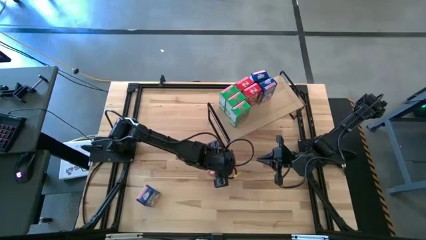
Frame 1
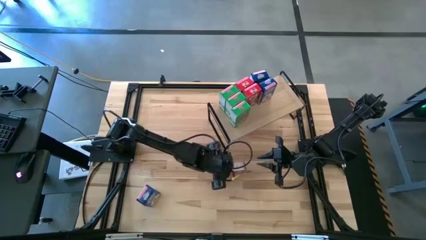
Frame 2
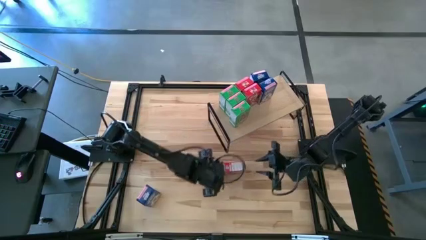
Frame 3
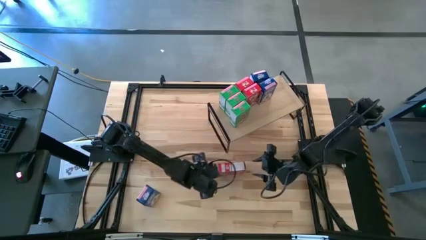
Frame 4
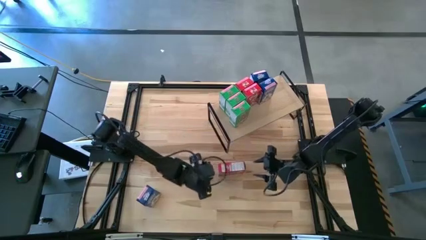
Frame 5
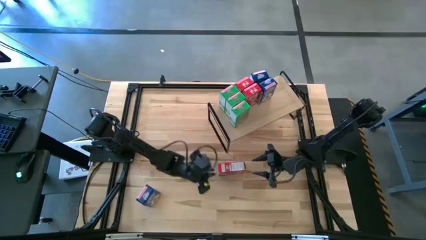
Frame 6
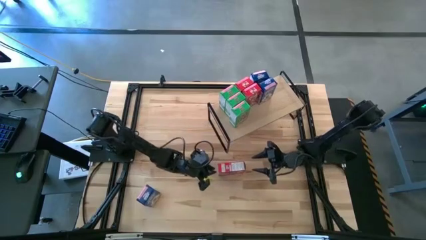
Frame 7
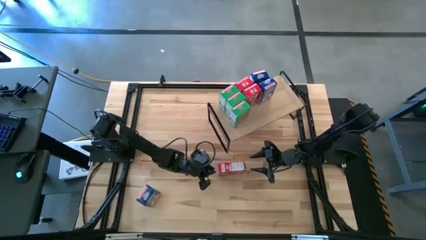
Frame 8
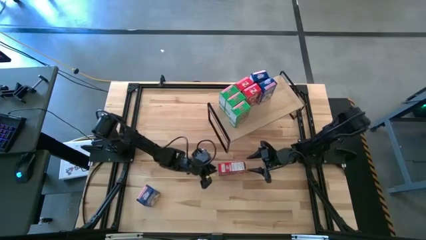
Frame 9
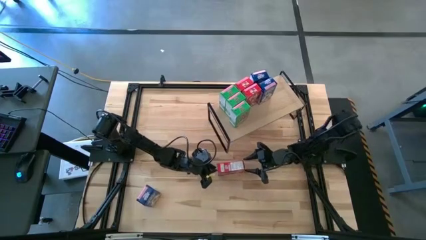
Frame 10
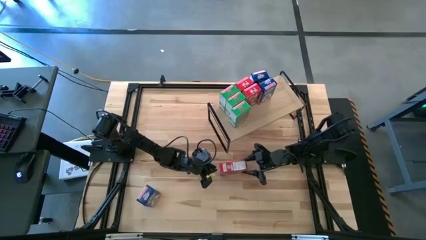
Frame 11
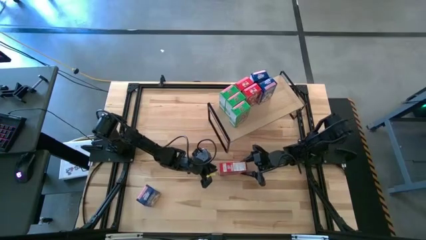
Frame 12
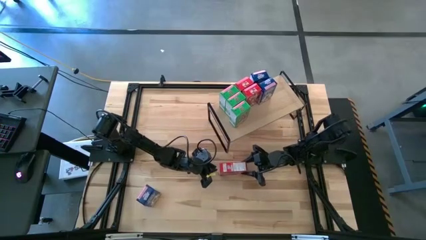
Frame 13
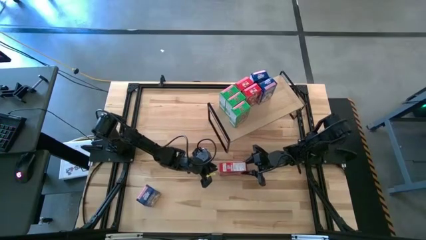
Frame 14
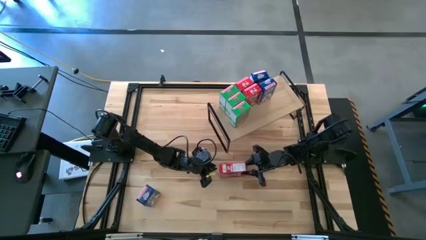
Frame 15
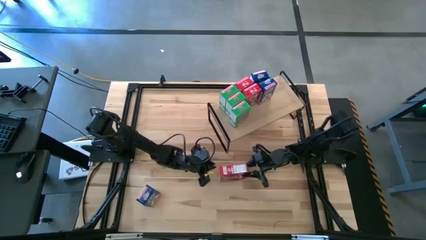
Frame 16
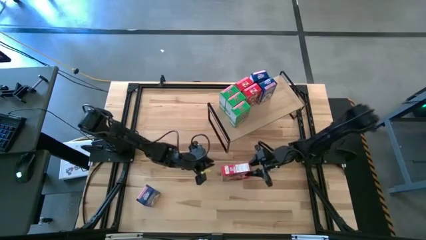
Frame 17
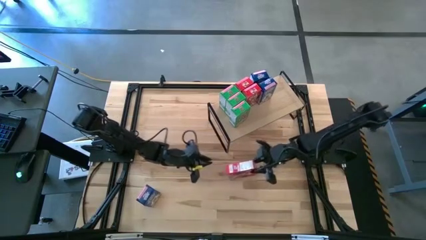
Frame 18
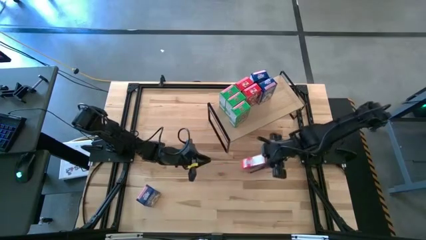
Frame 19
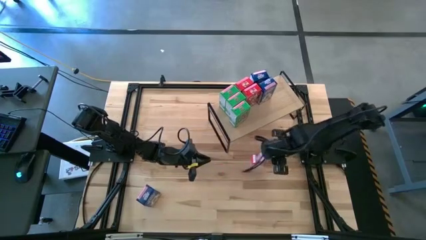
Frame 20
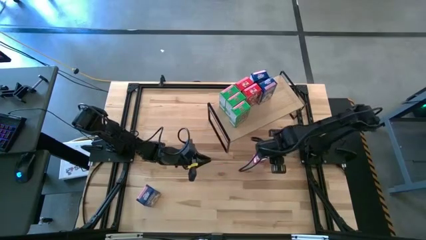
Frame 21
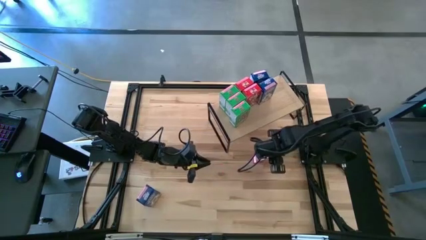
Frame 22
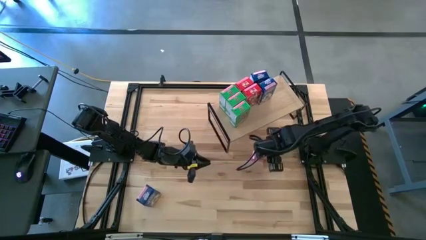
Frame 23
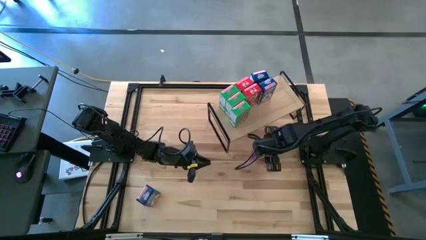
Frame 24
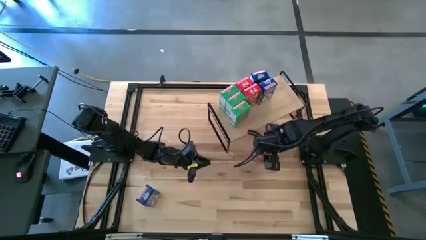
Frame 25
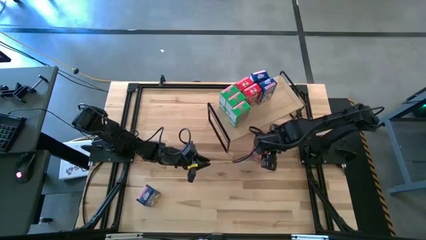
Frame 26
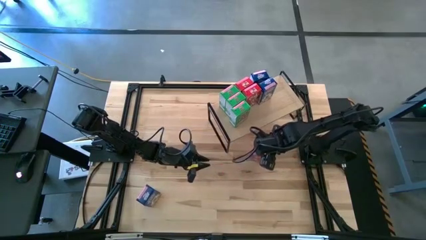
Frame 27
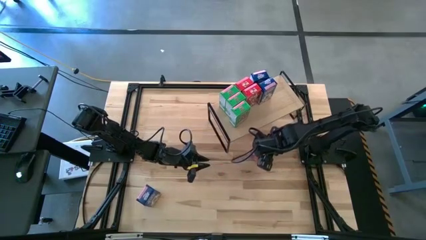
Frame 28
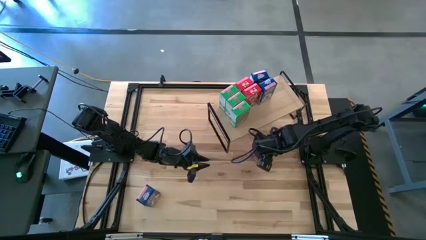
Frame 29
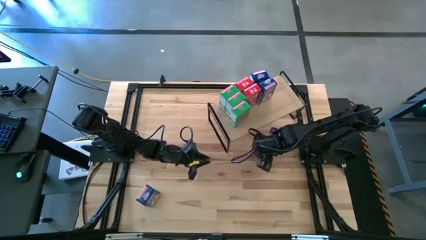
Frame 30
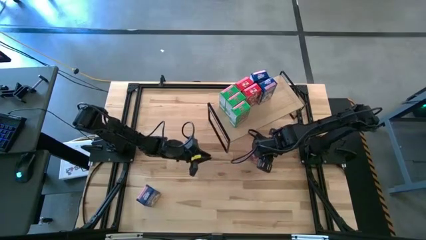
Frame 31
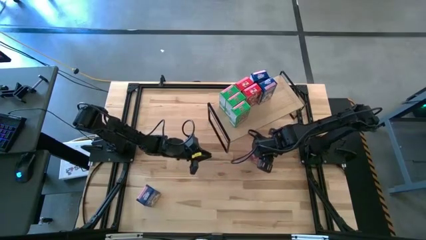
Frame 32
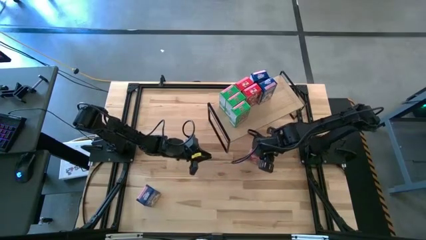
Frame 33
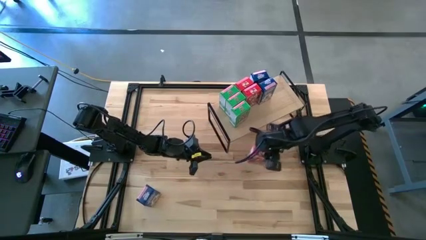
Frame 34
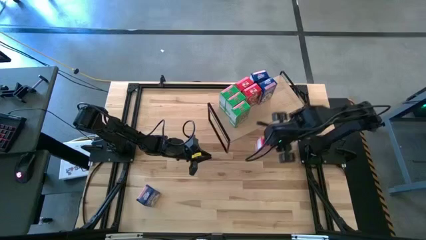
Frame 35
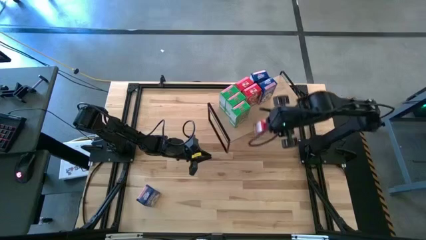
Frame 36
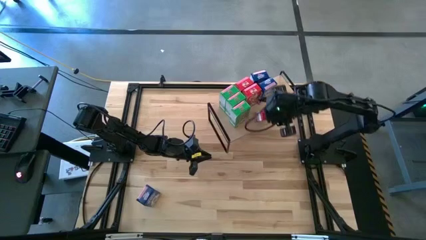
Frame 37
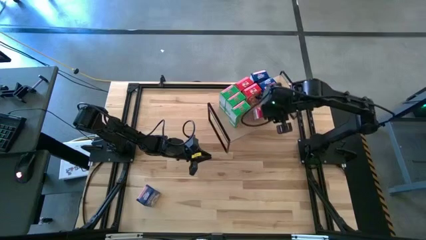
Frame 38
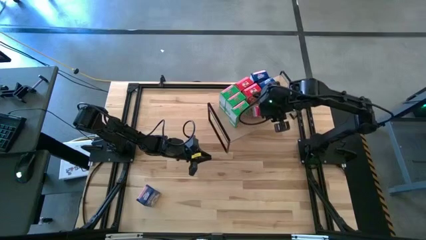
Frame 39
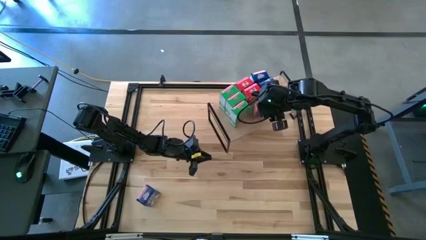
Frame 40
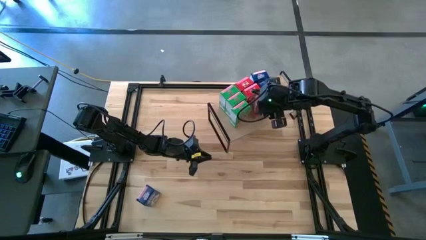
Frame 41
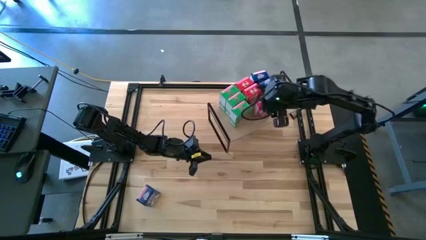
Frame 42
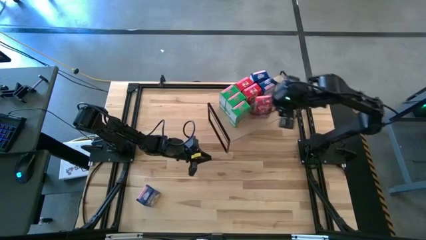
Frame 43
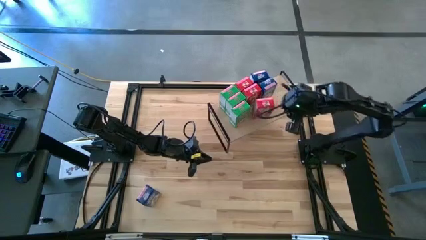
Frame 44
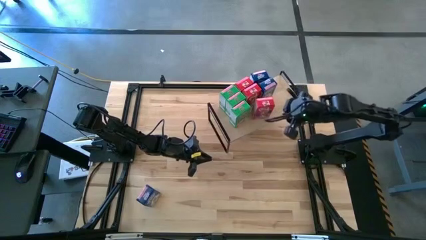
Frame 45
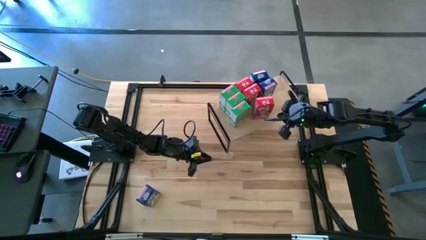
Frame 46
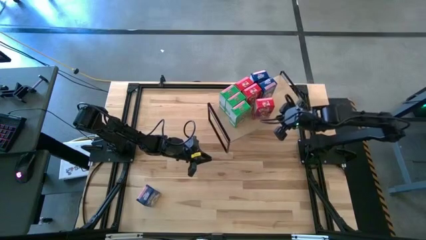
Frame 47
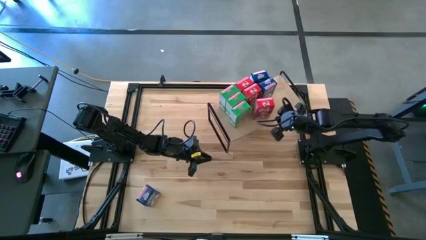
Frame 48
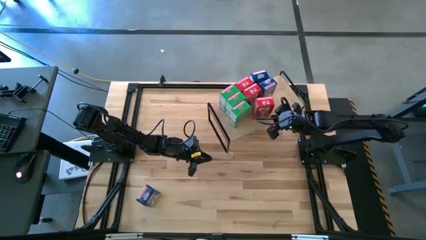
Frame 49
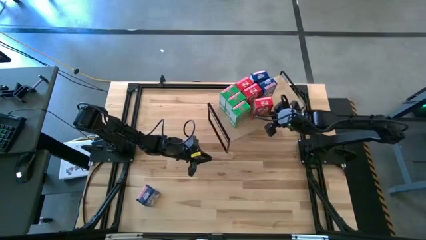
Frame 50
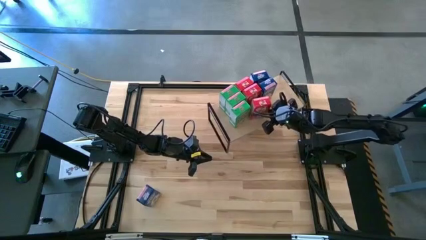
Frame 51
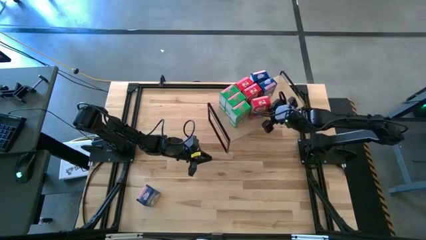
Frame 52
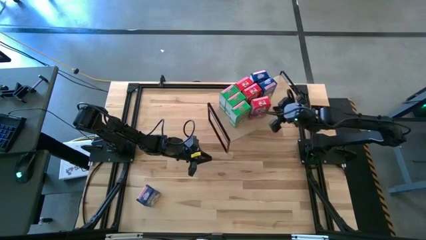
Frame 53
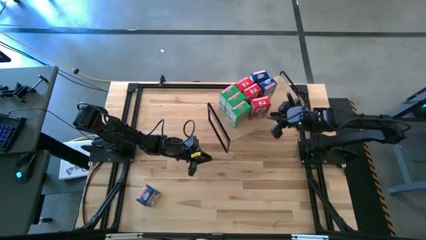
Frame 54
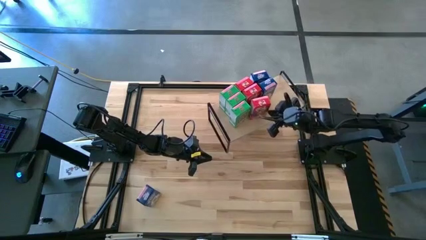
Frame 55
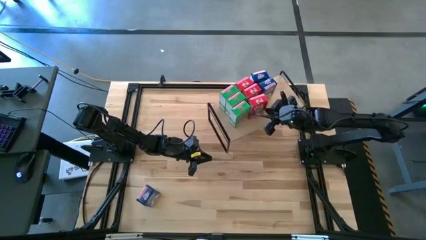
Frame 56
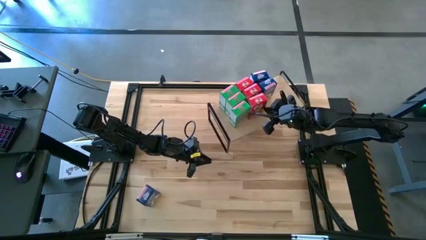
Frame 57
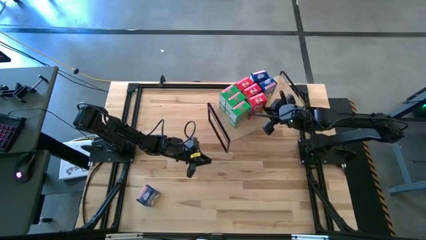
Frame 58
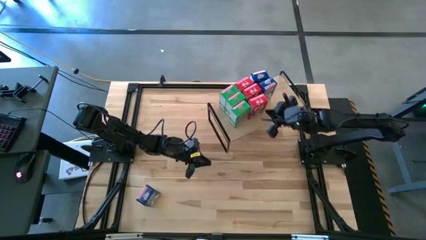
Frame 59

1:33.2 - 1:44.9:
Task: Stack cereal on shelf
Put the red cereal box on the shelf and aligned with the other red cereal boxes

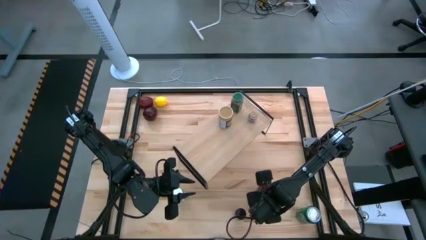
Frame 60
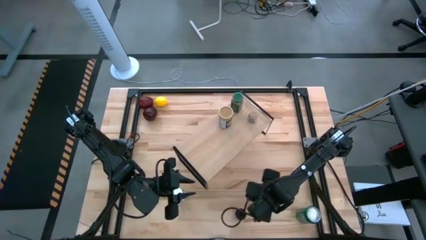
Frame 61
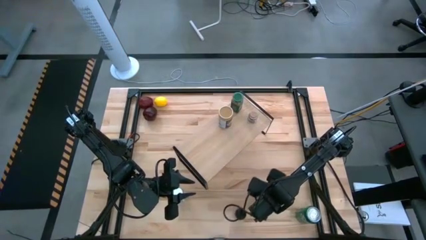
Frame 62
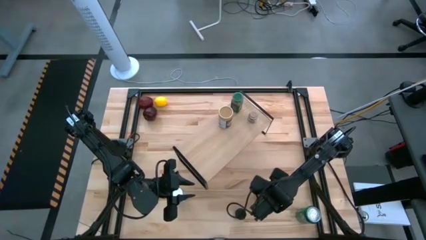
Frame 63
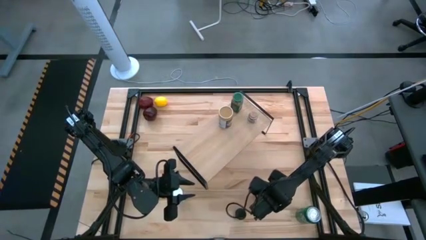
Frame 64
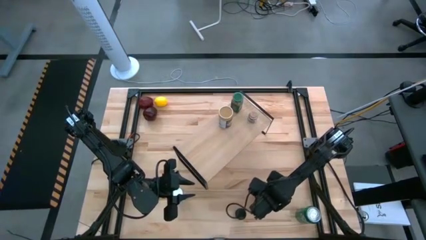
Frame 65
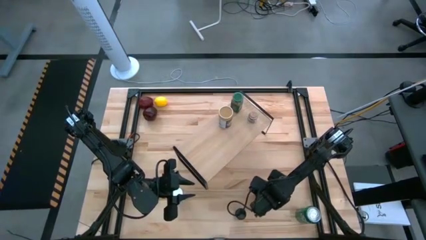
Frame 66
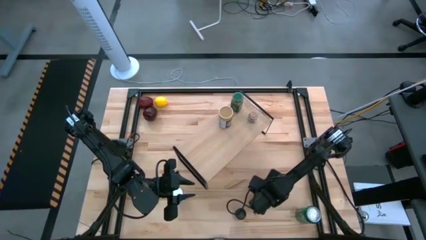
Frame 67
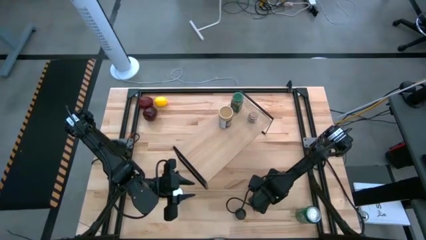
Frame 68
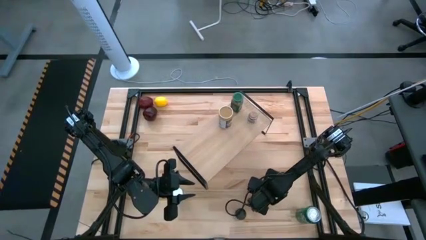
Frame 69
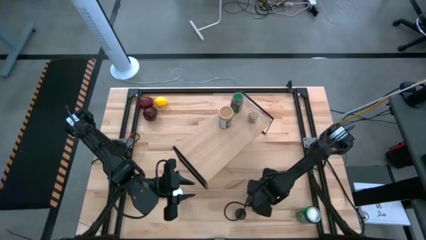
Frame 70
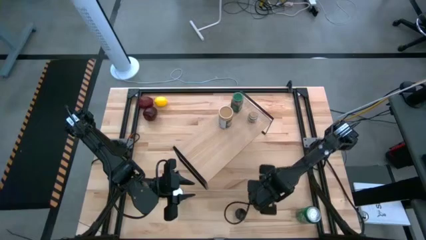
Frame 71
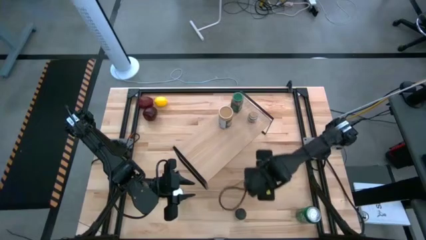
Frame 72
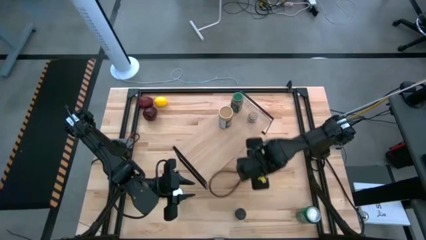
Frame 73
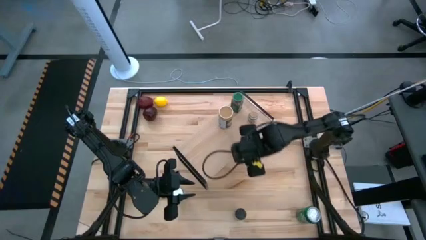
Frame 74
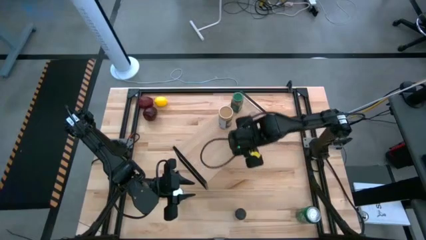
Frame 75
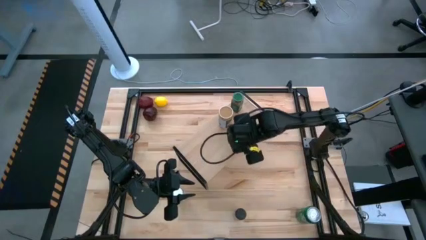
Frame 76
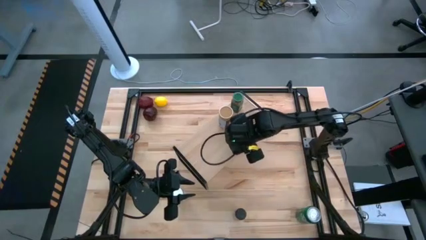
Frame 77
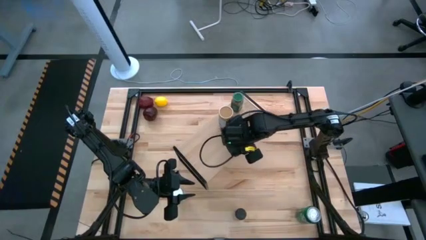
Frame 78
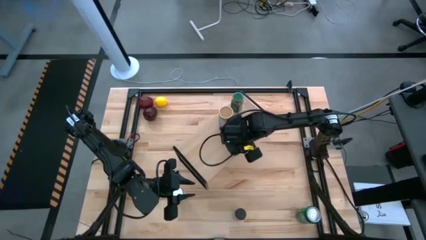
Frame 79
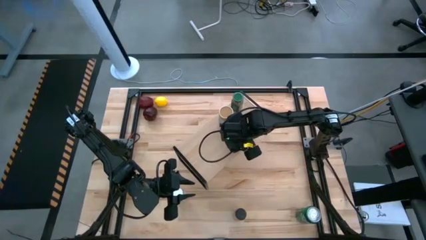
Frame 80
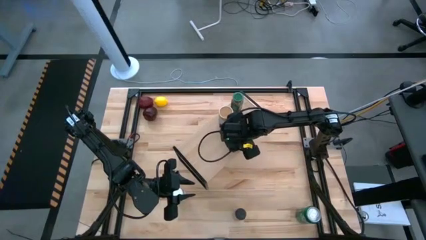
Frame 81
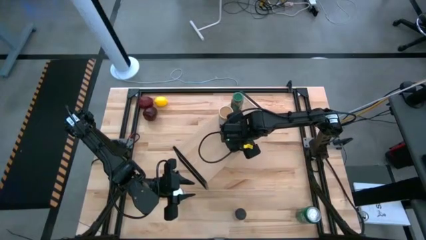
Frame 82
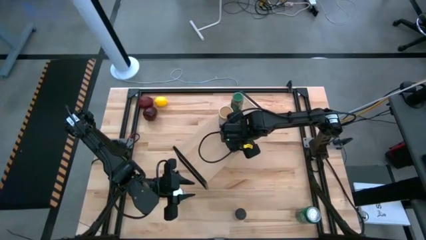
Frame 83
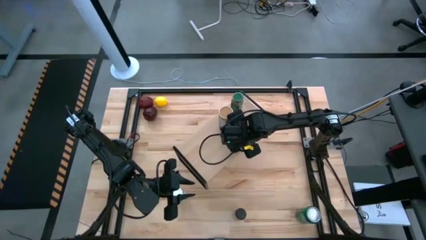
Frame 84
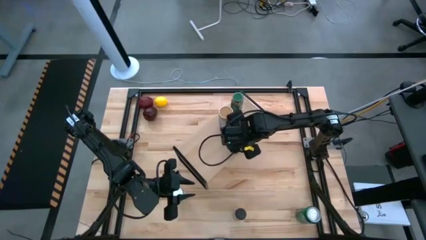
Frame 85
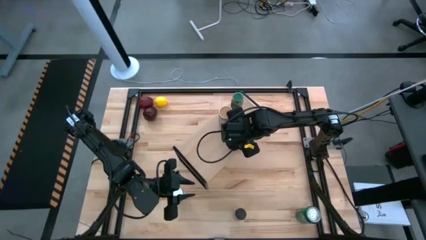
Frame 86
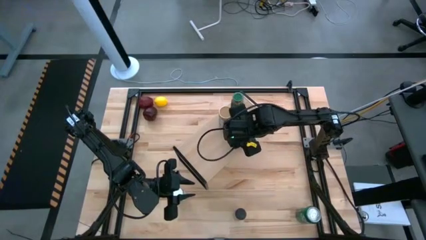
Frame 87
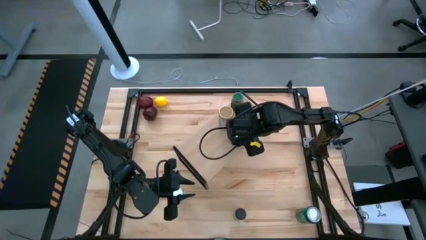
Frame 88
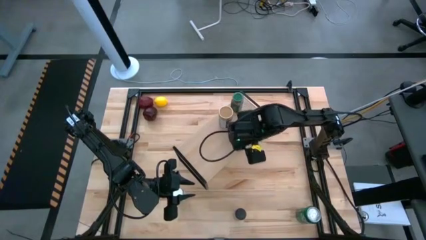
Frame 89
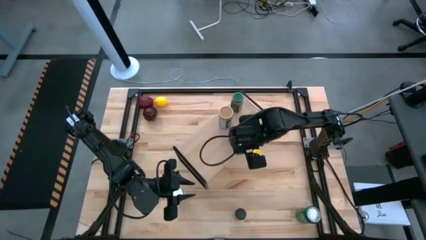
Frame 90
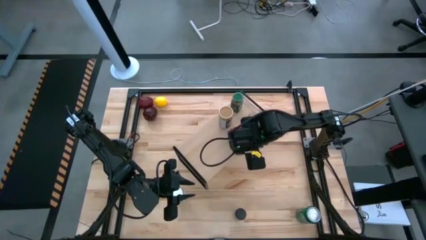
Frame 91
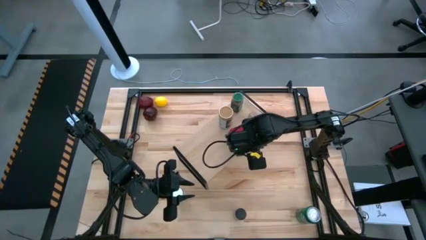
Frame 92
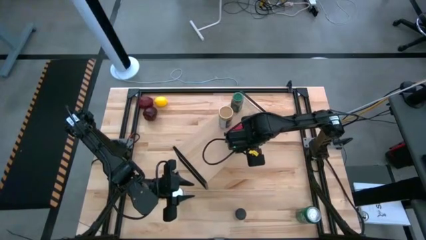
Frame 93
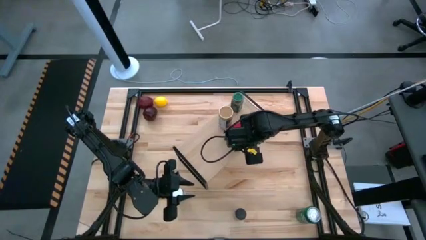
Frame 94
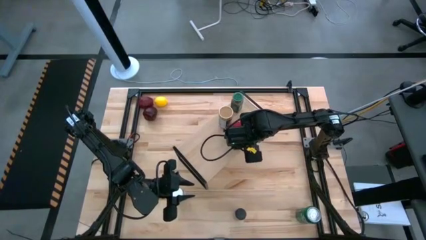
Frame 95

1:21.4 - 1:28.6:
Task: Shelf spices
Put the red seasoning can on the shelf
